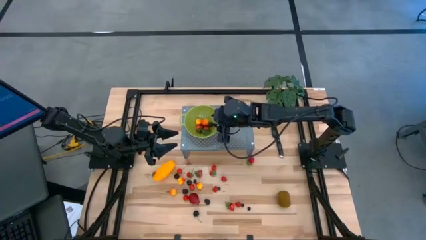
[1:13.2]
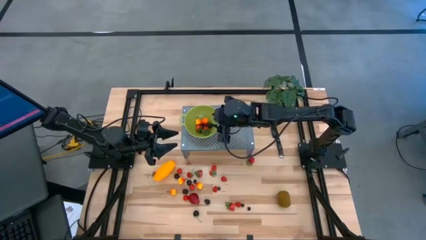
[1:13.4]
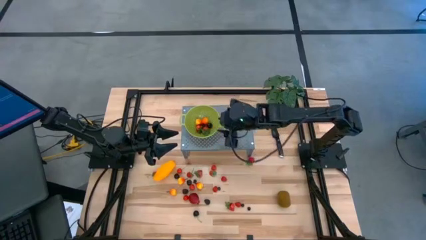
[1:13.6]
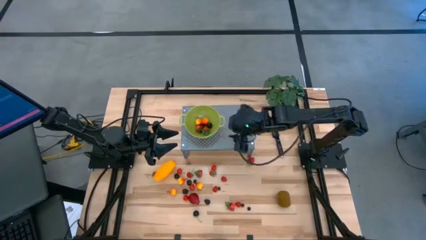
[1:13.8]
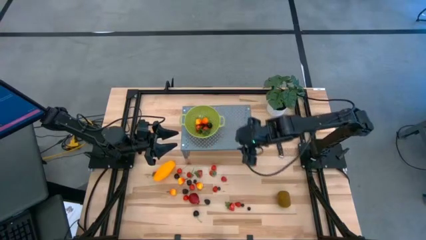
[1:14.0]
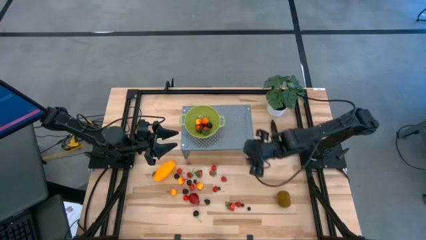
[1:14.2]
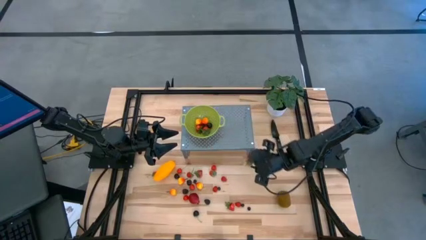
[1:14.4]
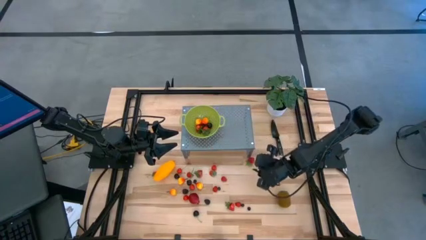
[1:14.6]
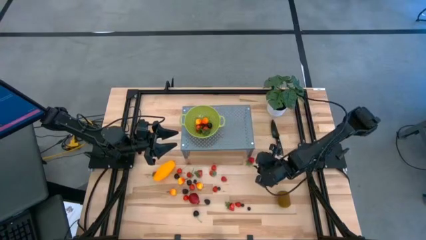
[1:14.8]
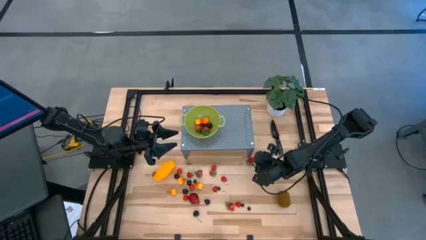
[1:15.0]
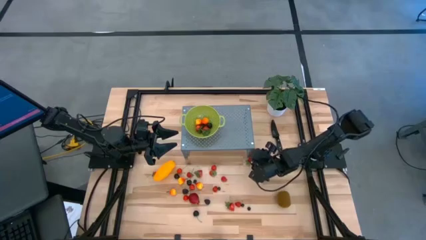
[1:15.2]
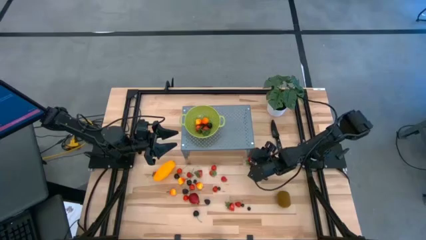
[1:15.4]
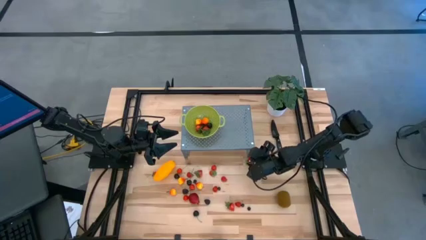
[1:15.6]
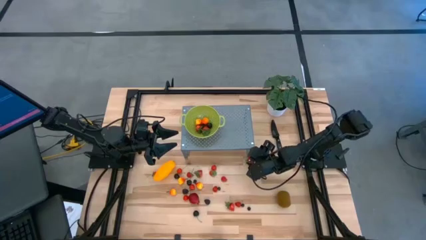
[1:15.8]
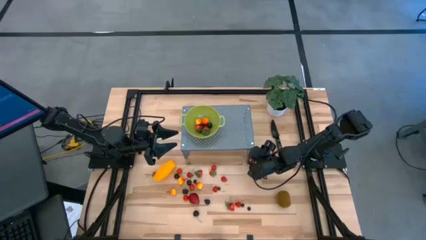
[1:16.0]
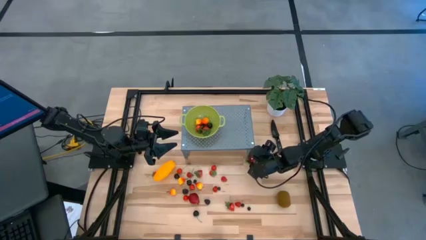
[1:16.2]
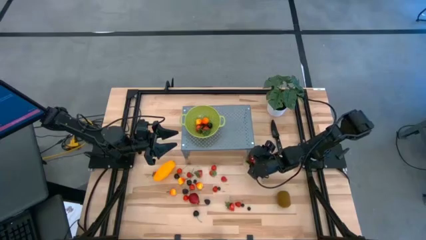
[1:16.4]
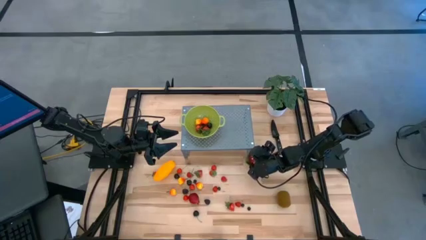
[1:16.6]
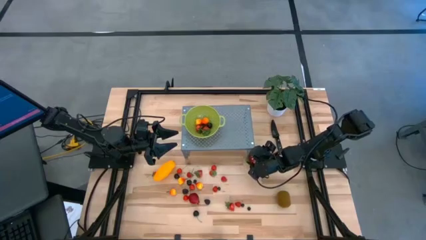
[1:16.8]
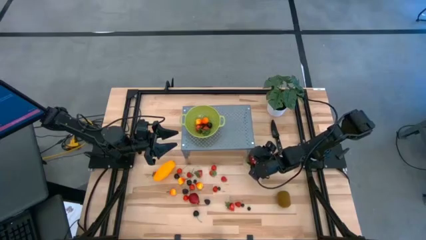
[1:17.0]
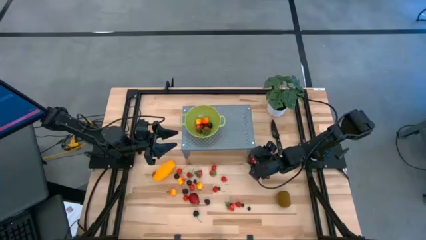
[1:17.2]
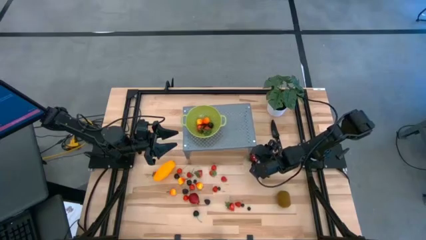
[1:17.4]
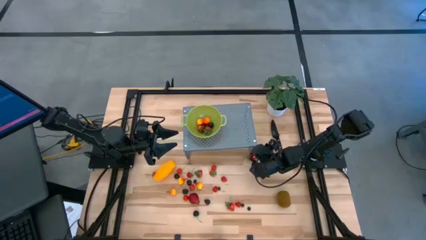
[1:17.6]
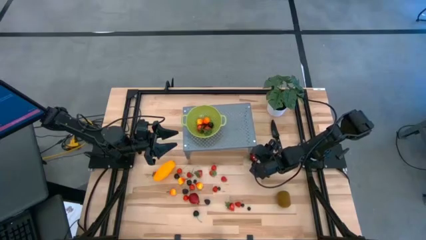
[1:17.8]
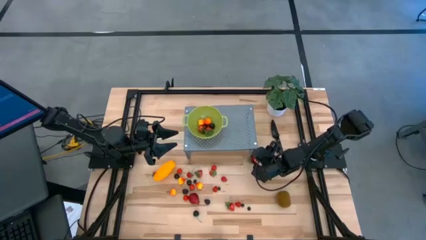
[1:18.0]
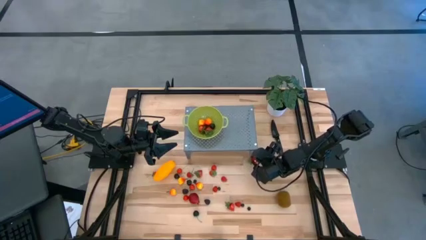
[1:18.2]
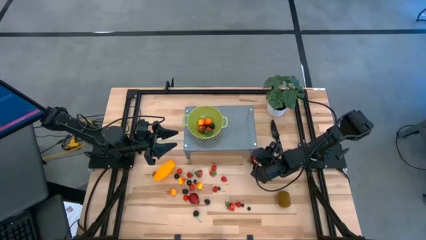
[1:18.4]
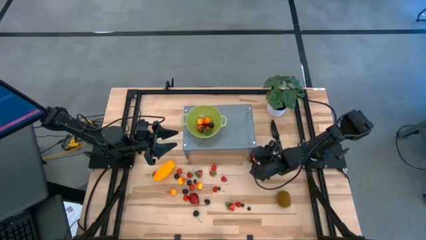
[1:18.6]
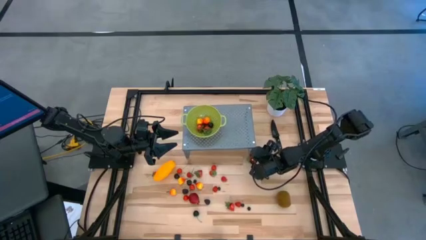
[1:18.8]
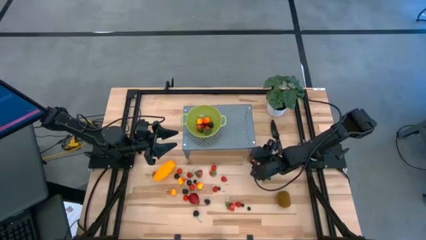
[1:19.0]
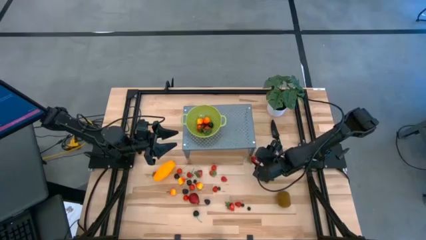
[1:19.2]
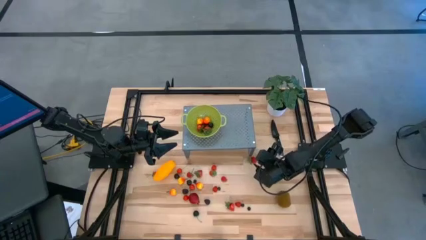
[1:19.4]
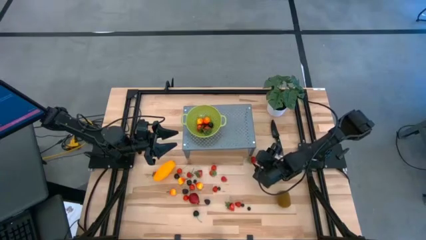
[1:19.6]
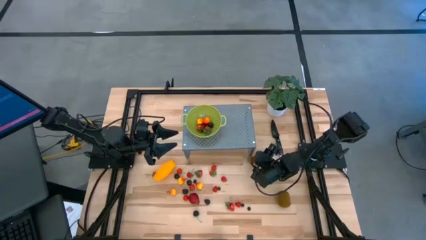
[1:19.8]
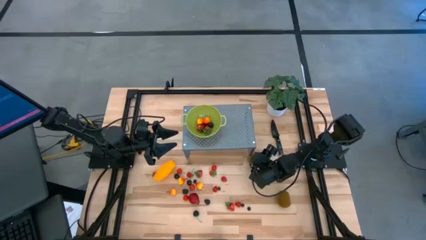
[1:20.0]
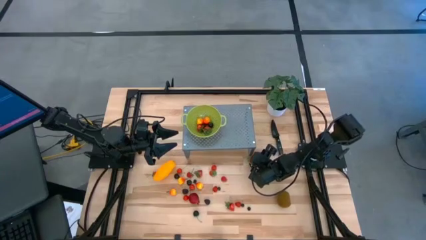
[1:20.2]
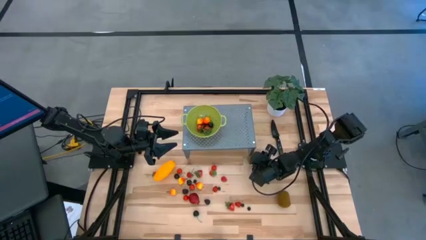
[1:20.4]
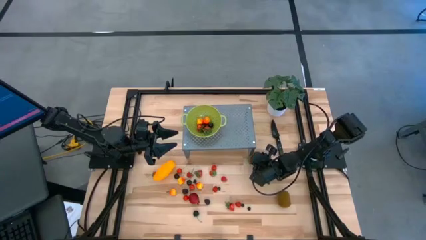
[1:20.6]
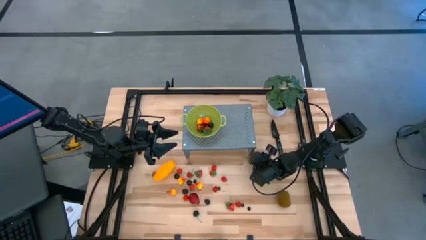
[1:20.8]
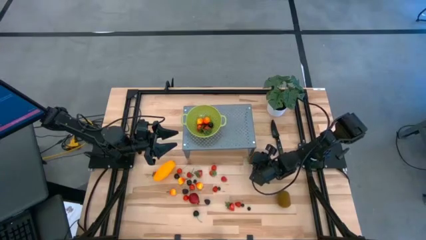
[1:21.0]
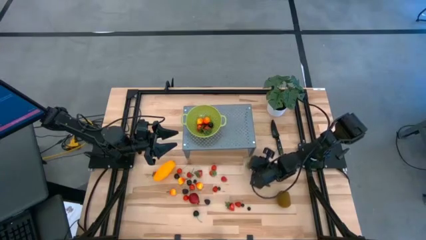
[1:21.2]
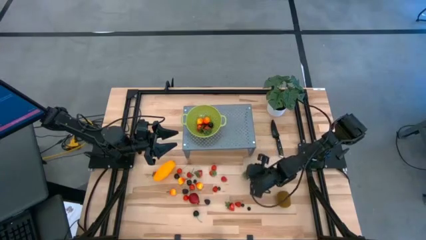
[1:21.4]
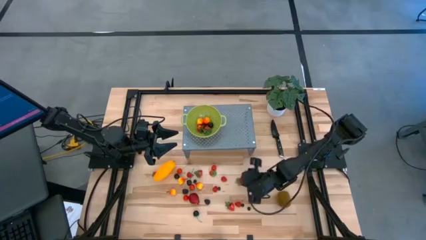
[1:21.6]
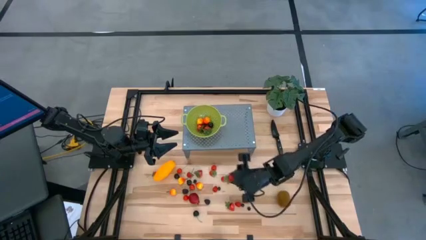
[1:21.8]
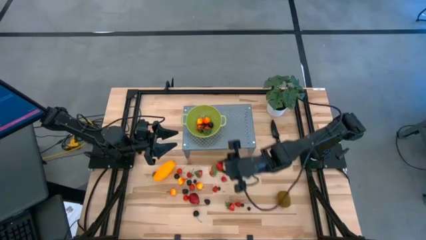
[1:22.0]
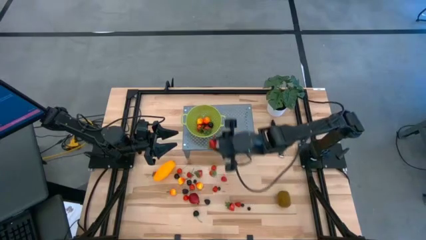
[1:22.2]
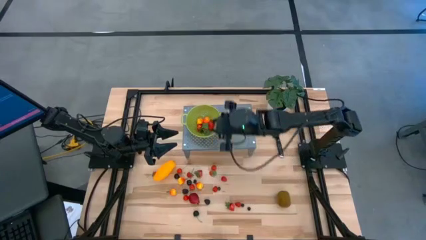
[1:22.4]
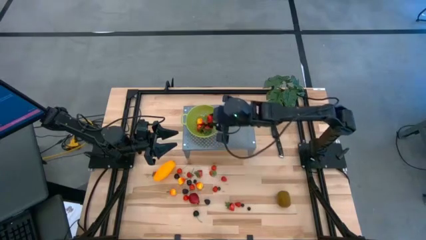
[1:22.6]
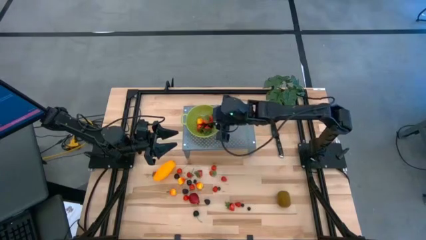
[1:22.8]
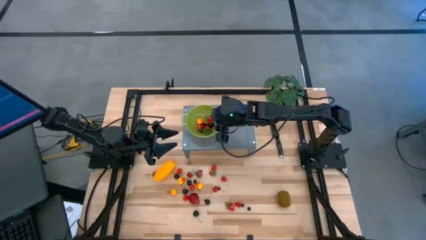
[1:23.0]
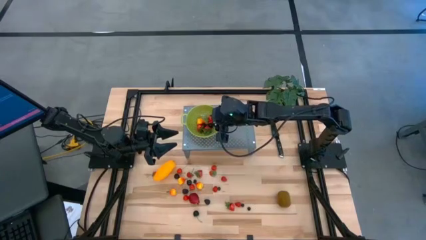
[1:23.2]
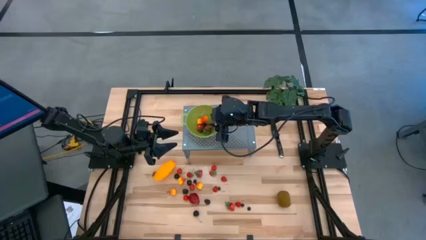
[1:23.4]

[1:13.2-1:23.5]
Task: Pick & Place Fruit
Put the strawberry into the green strainer bowl on the shelf

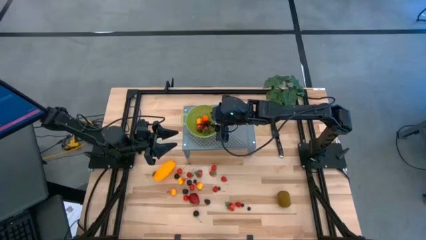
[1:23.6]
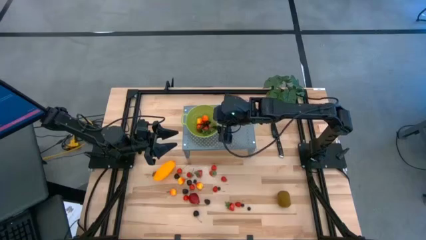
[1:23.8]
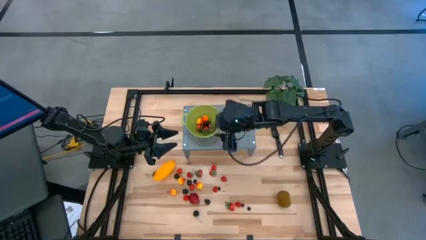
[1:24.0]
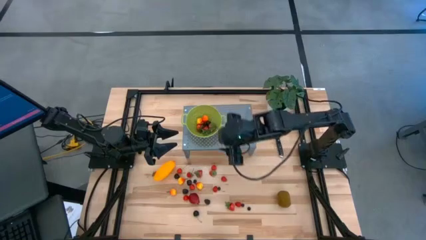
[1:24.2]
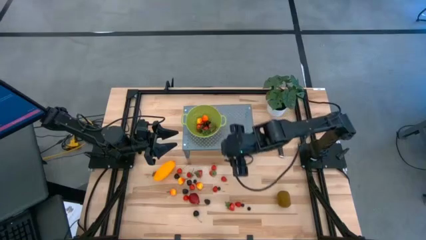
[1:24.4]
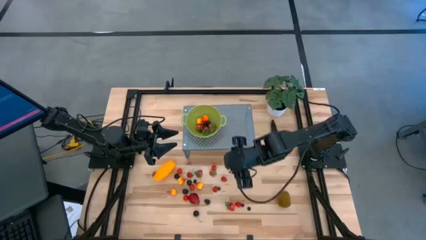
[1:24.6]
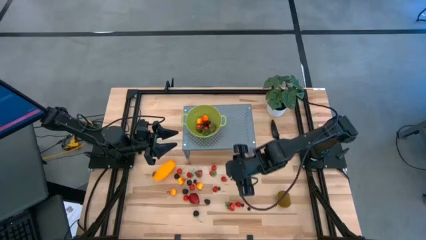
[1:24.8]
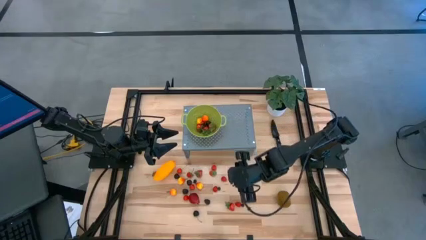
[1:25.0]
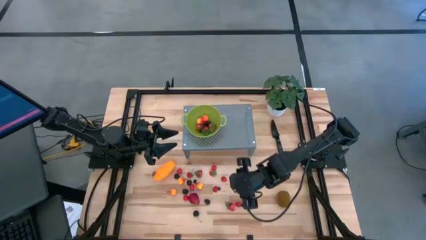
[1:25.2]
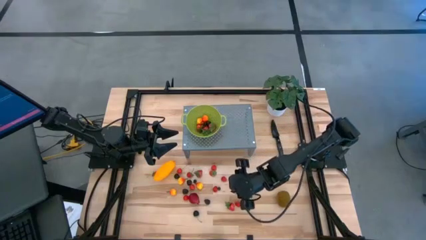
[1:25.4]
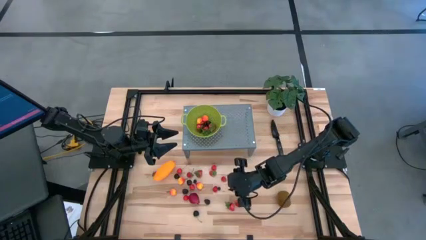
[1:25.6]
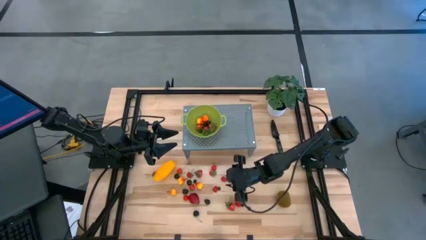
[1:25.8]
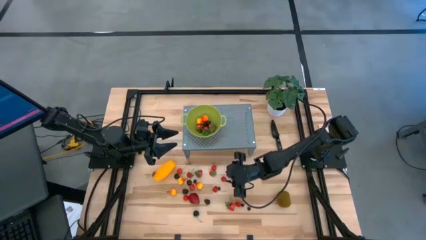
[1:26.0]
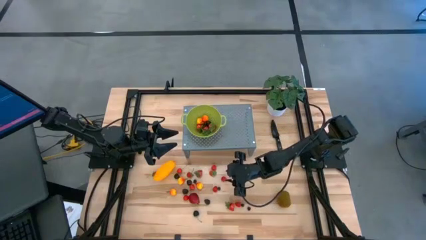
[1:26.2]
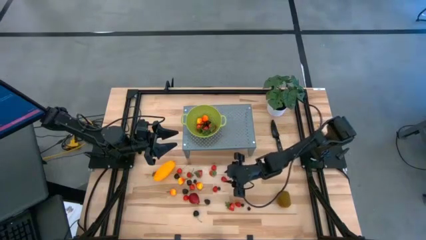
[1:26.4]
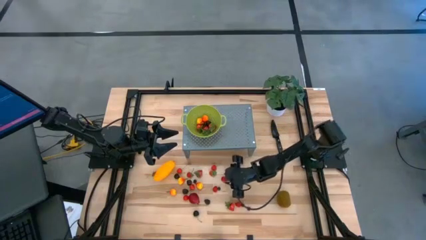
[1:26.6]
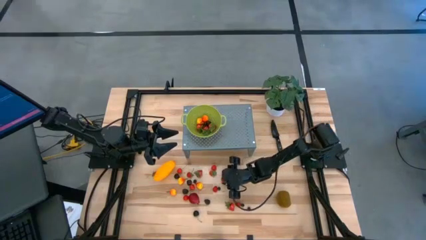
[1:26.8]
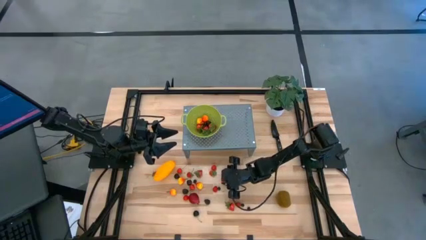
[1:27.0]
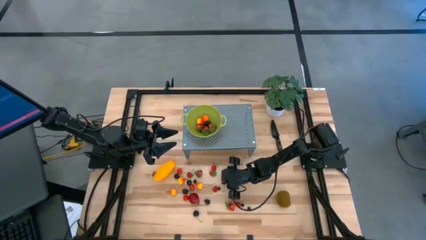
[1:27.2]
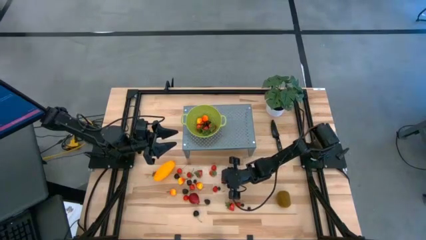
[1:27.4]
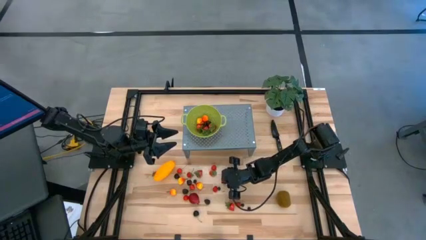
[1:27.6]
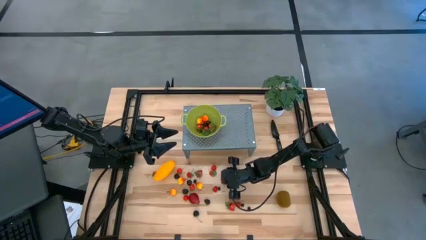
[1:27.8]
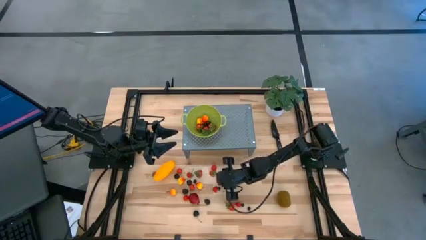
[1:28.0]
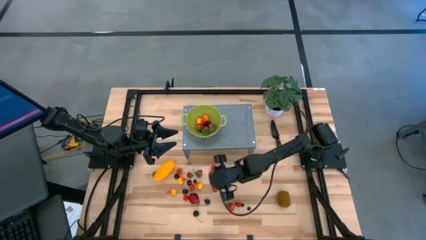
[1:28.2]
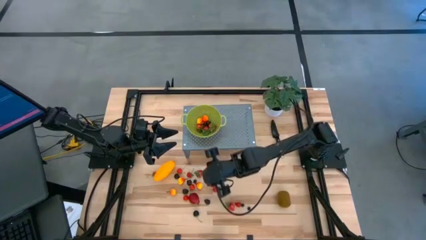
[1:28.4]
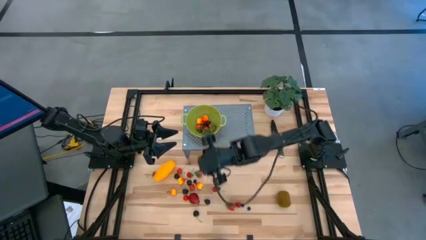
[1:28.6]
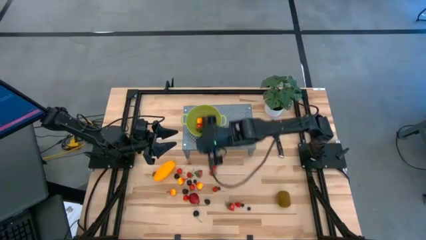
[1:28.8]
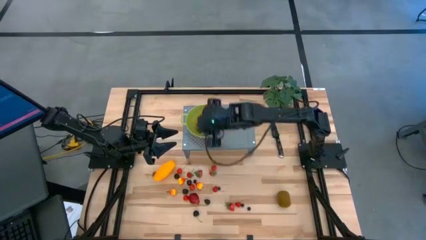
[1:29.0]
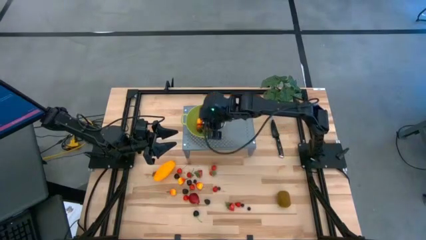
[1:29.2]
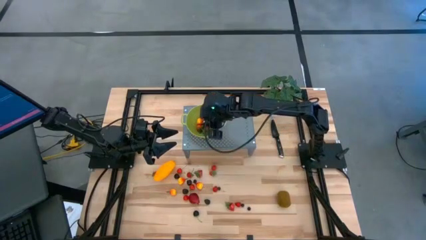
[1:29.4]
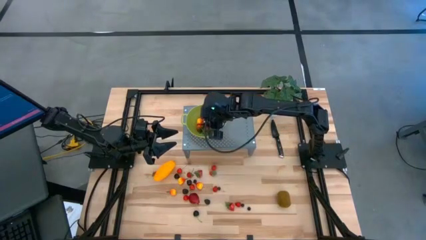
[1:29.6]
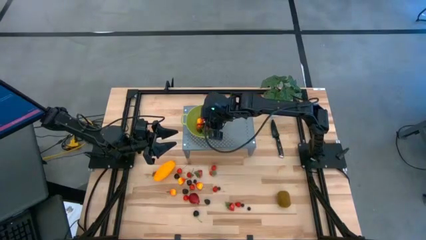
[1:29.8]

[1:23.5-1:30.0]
Put the red raspberry into the green strainer bowl on the shelf
